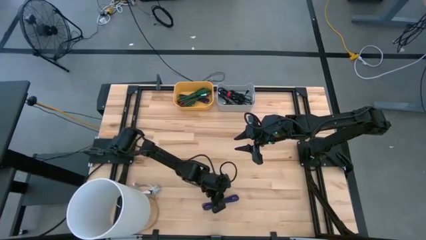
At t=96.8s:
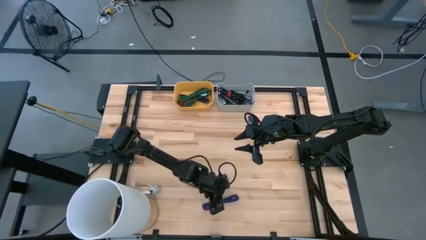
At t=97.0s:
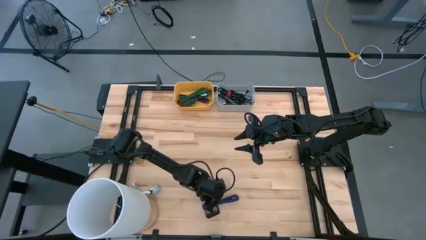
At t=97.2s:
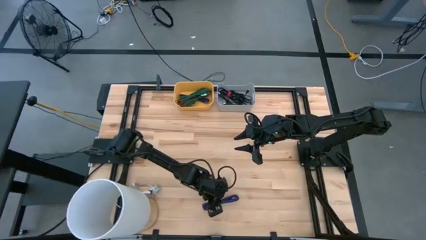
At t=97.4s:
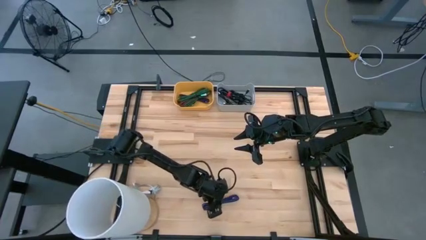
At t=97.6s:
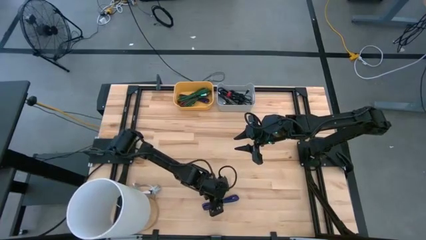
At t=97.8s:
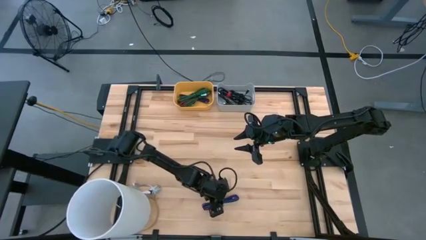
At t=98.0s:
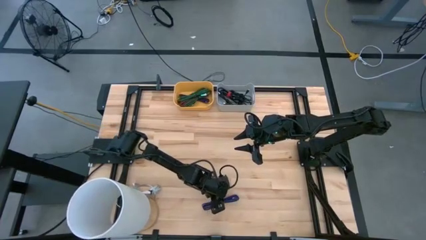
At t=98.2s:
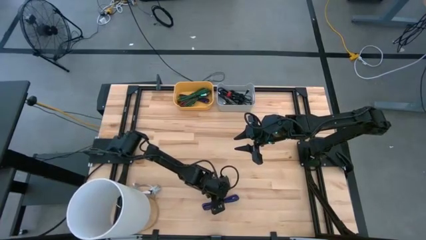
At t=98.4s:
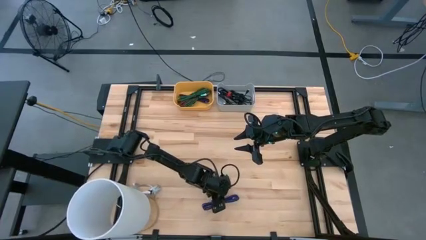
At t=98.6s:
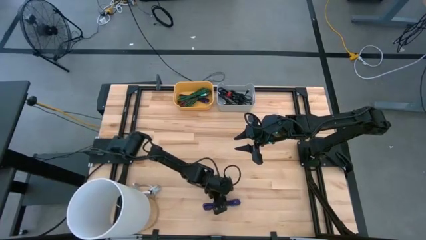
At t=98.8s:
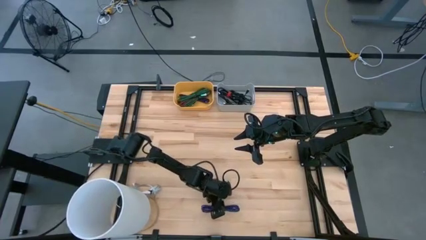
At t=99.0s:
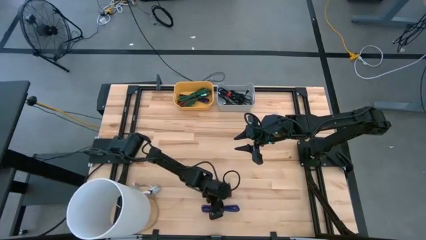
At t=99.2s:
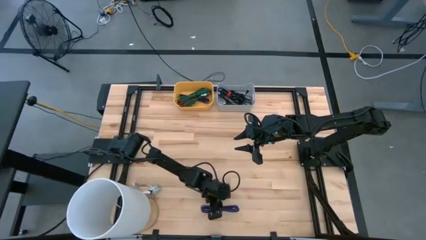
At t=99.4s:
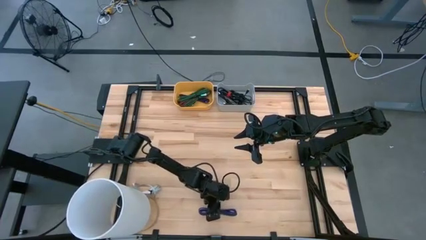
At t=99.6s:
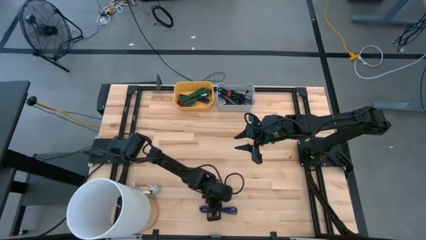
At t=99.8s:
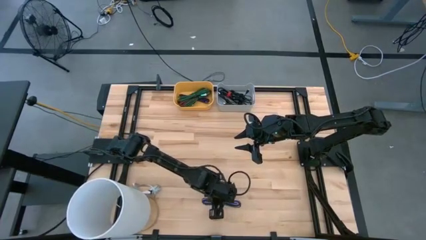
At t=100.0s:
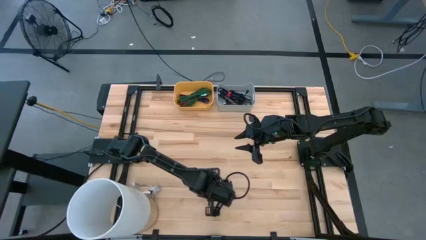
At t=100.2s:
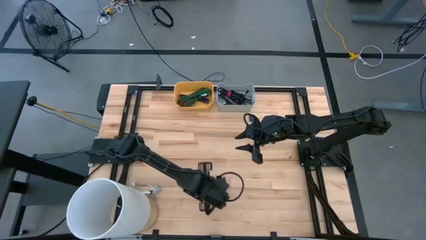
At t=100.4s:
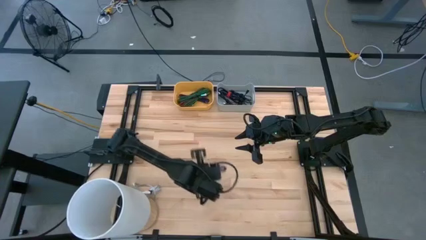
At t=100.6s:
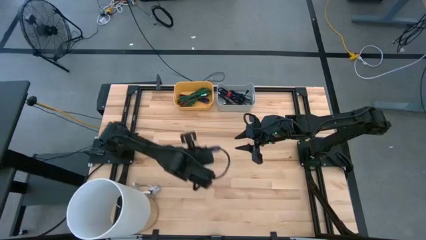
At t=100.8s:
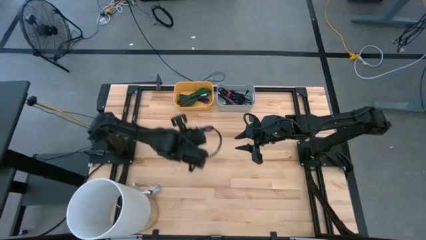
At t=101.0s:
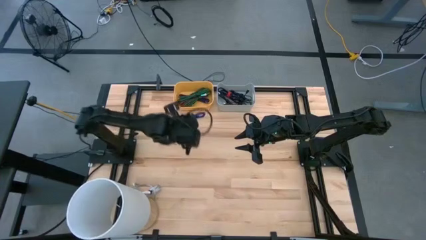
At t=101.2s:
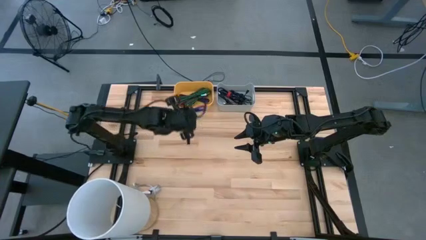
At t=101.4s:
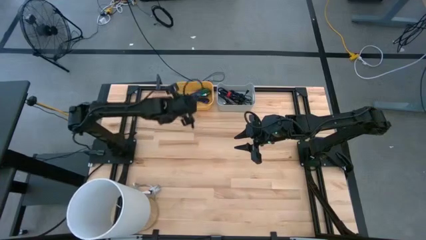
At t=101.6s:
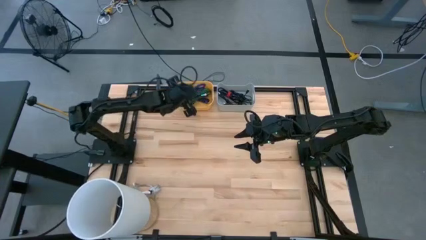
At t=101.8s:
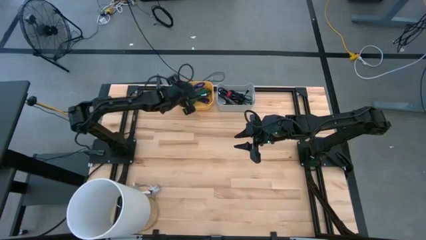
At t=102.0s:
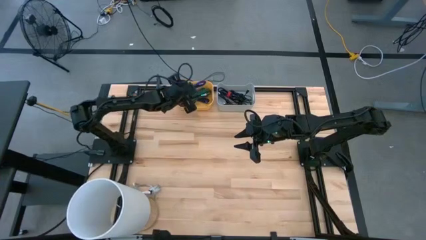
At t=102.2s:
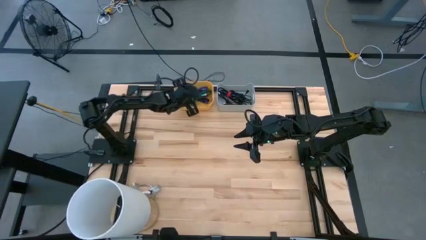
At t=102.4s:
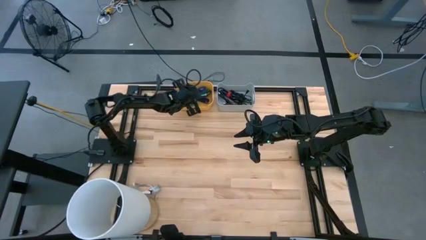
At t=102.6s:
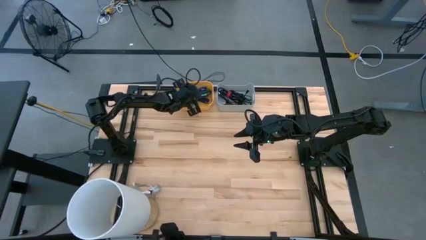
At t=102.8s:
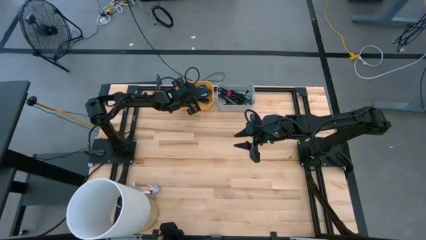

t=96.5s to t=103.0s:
Task: Pick & Place USB Port
Put the violet black charger cable into the yellow bin

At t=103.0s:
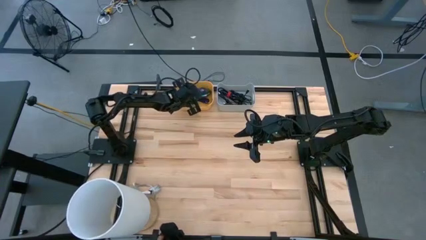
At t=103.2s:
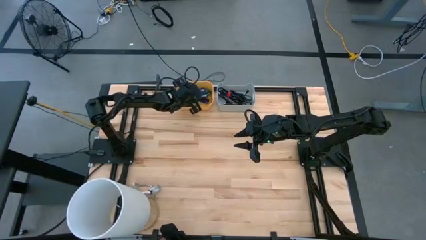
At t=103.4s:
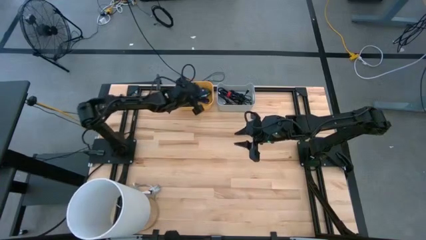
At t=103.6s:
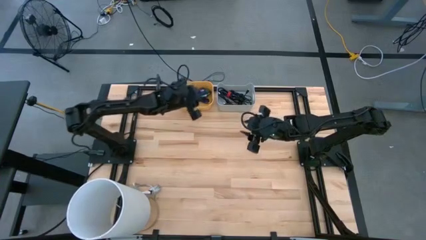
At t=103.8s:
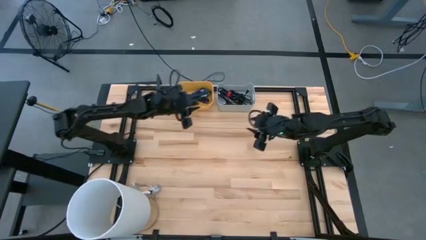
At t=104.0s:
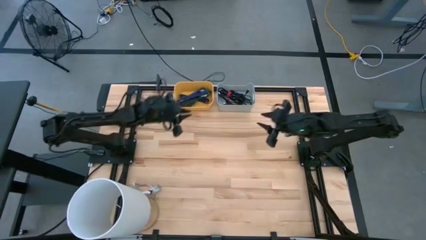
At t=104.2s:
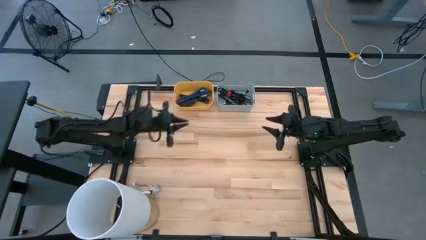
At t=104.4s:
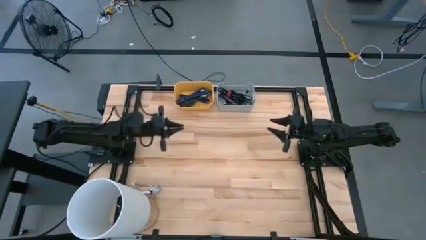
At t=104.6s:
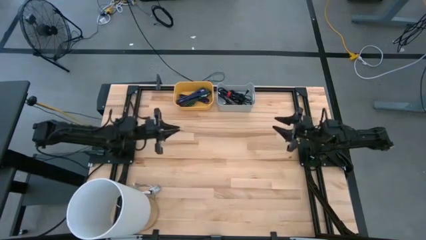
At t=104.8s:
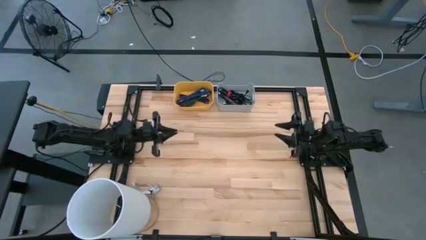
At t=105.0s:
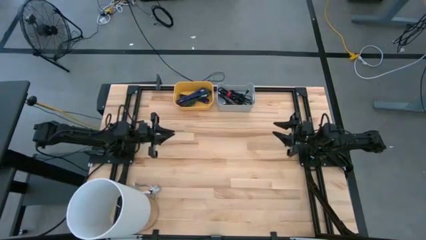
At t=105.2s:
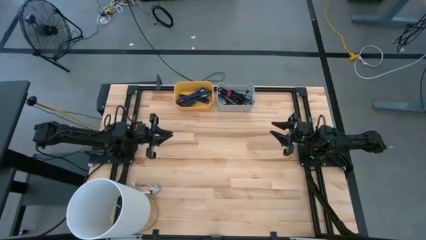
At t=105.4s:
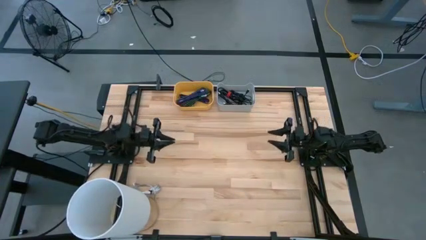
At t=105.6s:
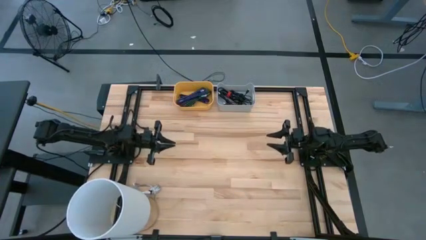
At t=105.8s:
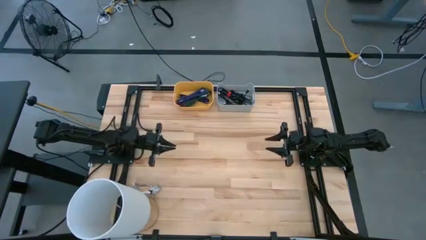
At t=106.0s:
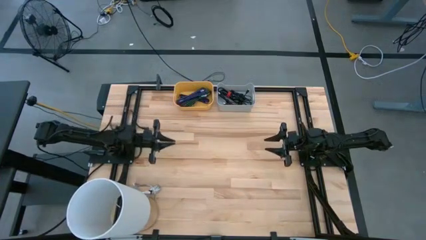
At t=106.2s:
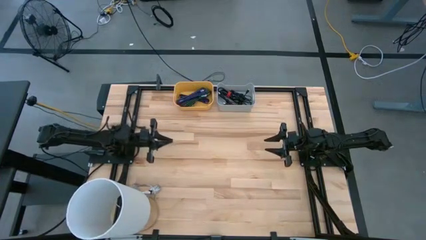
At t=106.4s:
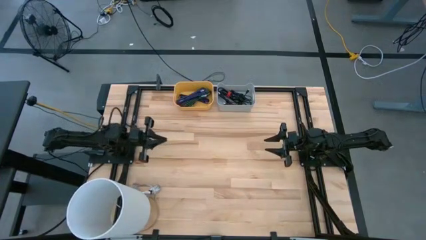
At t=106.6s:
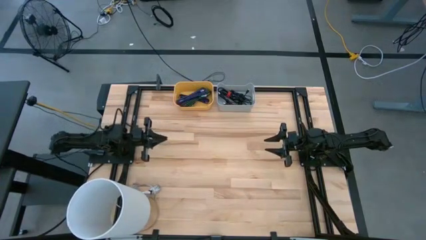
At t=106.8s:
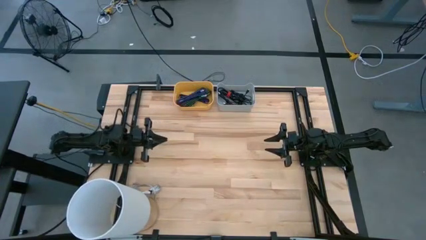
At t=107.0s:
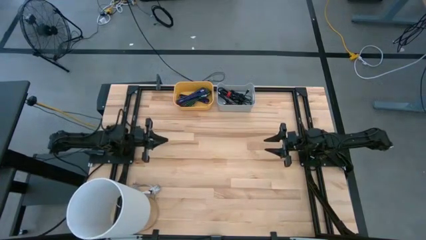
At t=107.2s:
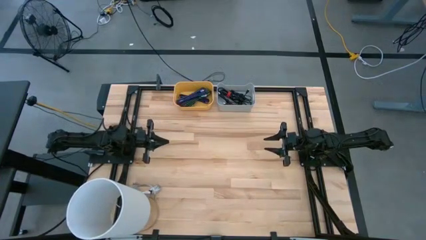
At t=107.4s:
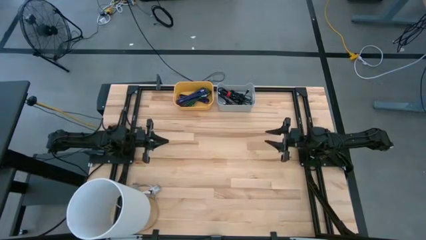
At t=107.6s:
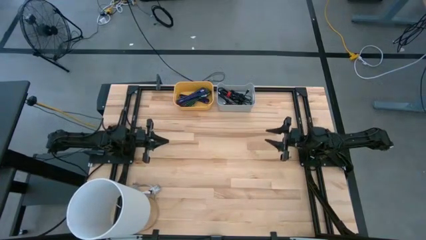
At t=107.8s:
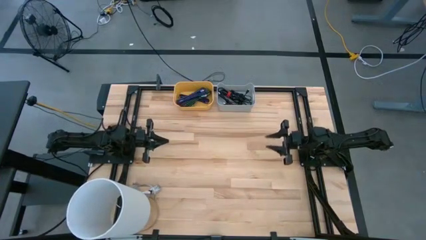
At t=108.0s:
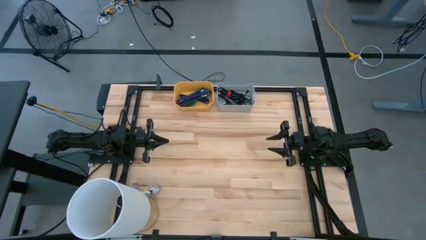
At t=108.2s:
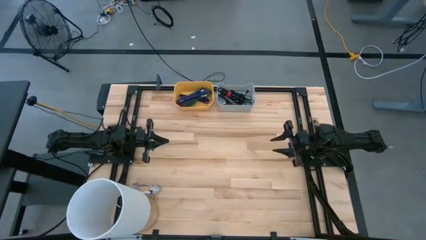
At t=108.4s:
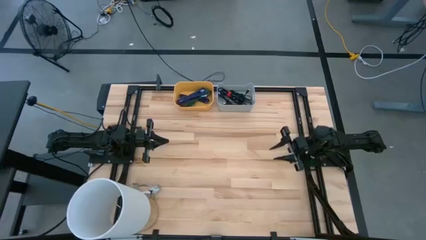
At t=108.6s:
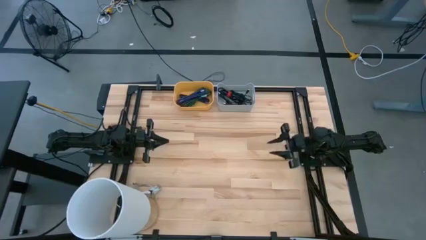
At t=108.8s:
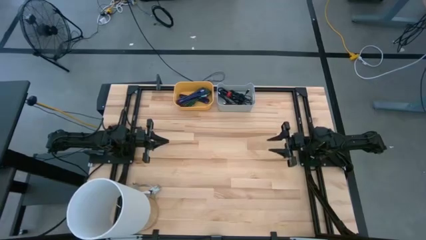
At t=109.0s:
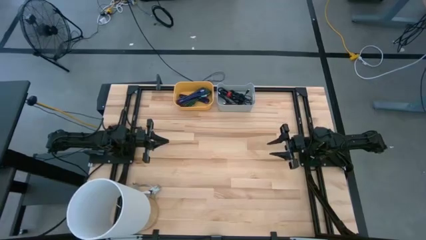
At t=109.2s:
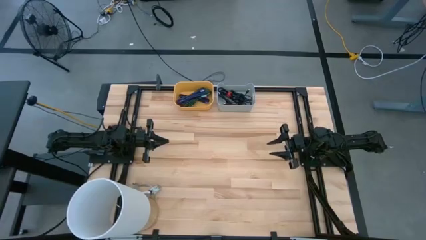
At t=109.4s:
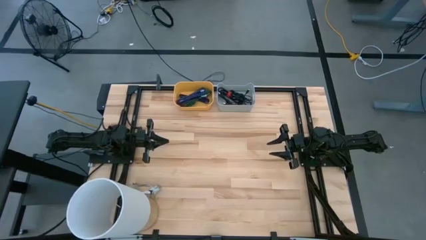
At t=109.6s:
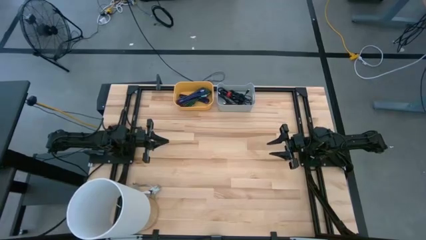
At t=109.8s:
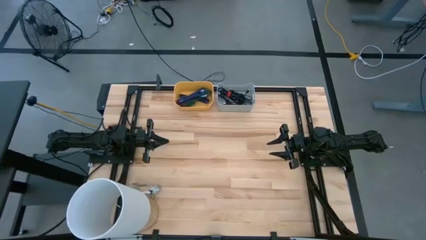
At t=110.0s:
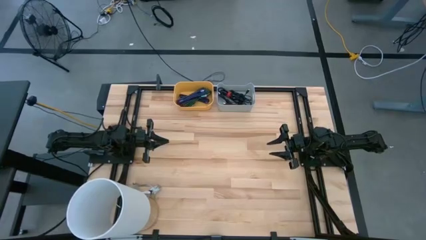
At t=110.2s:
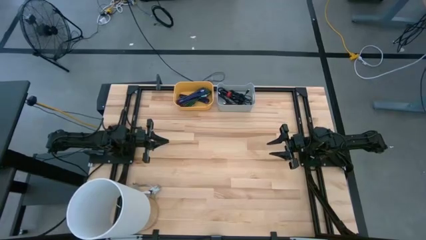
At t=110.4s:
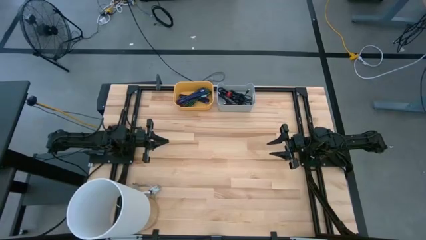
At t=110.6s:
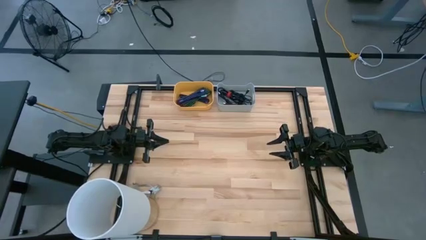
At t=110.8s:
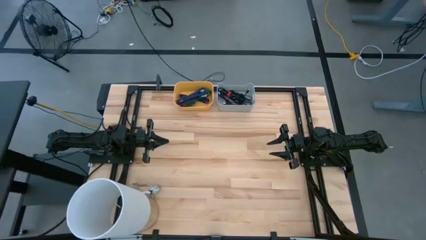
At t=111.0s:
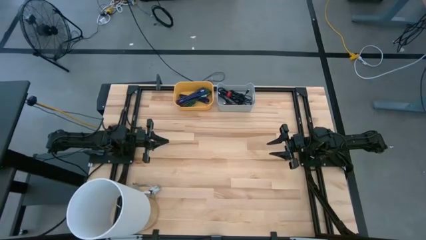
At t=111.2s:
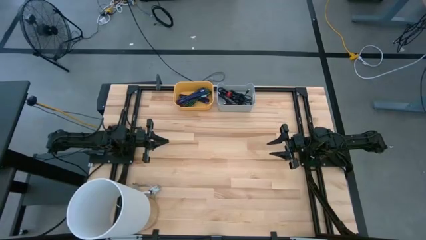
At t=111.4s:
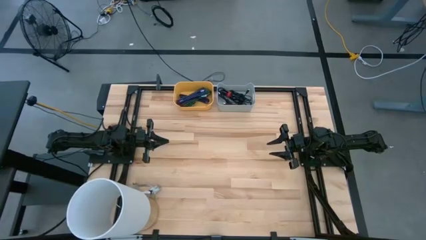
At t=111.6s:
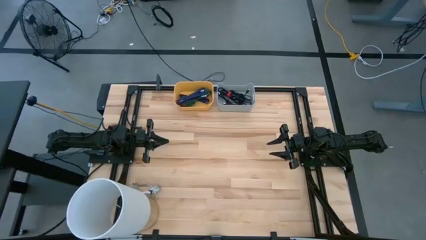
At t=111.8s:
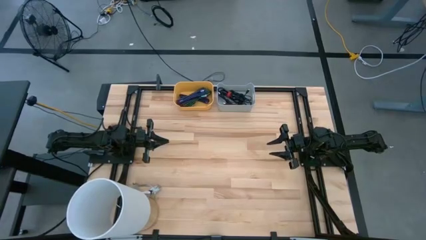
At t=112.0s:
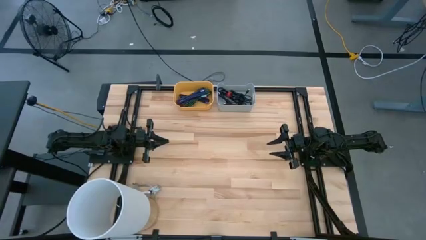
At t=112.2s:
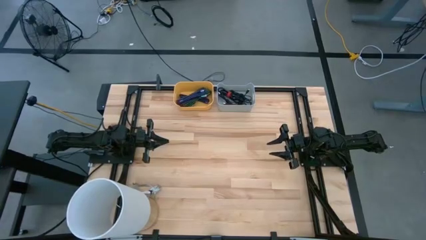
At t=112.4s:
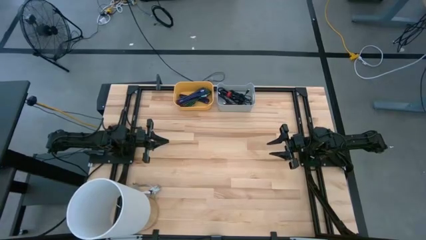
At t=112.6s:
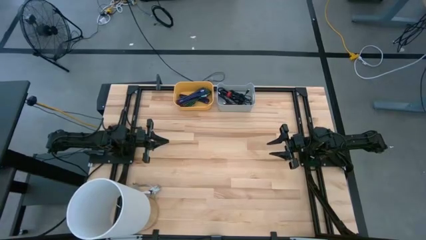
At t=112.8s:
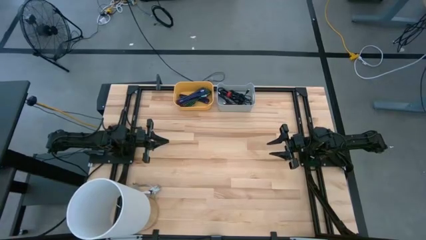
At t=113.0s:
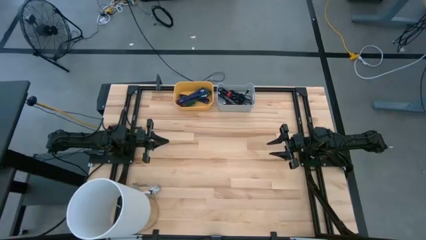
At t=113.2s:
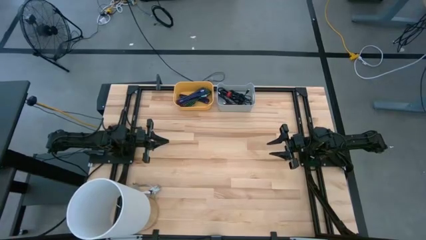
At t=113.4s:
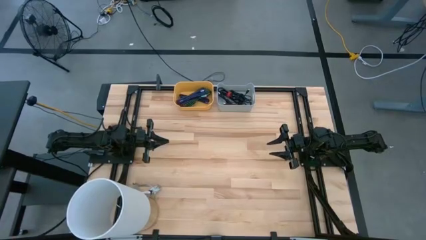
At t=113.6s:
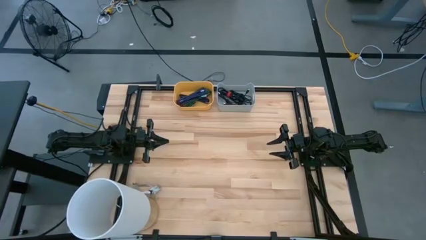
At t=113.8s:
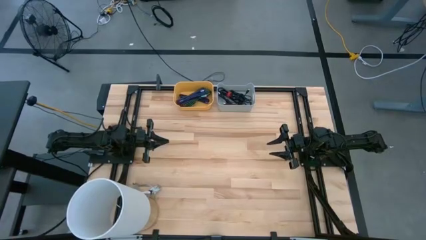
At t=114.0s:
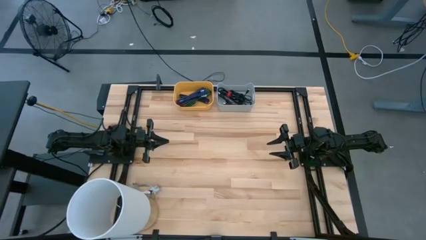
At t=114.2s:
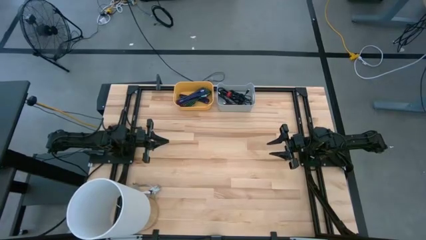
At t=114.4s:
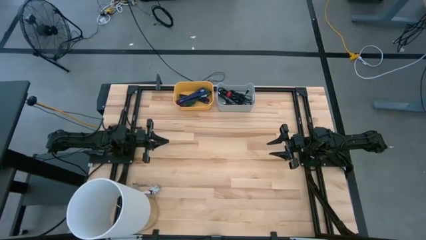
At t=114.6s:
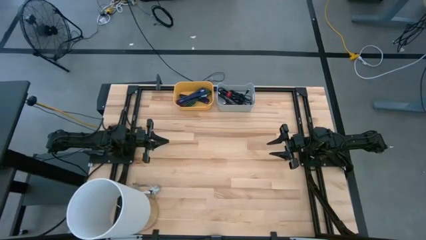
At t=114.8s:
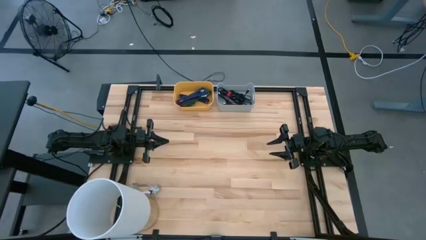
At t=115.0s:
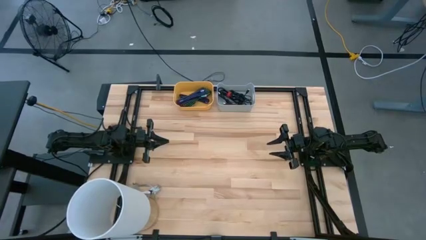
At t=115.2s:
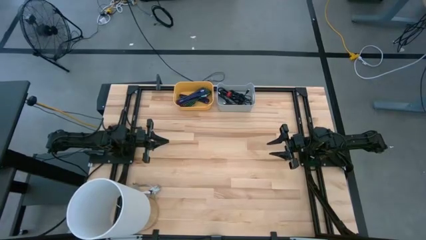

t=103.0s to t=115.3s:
Return To Home Position
